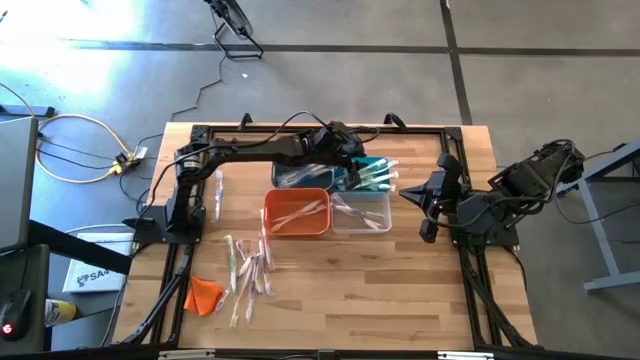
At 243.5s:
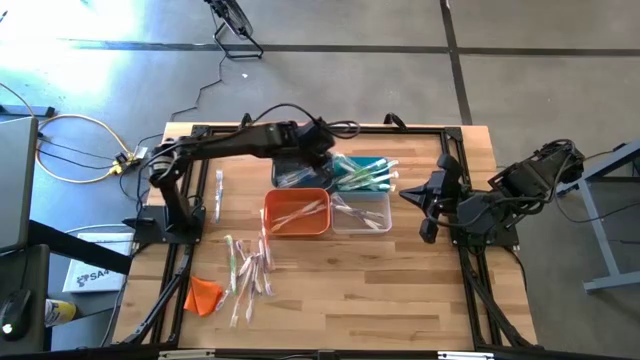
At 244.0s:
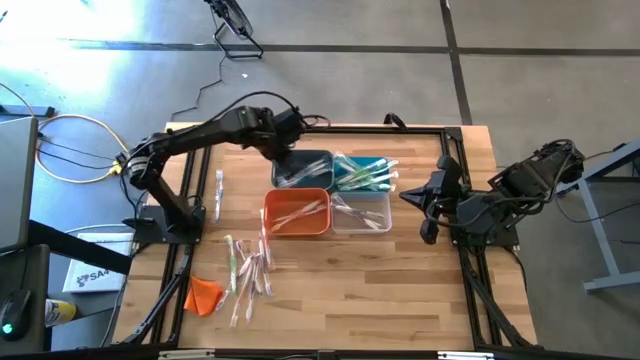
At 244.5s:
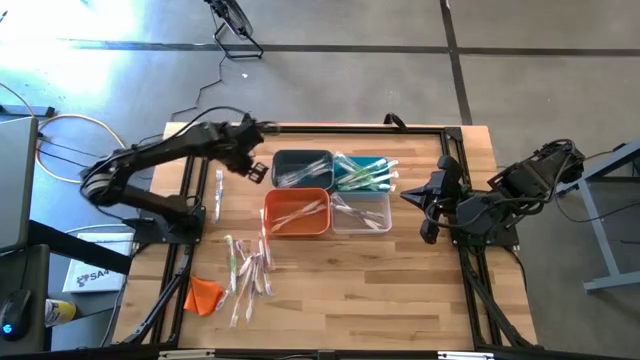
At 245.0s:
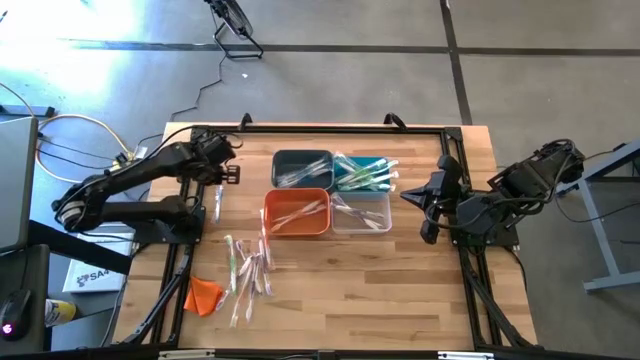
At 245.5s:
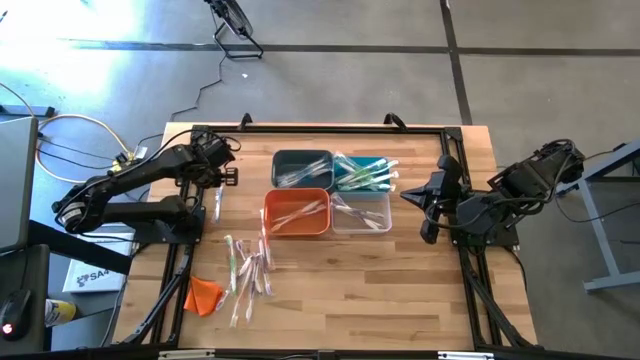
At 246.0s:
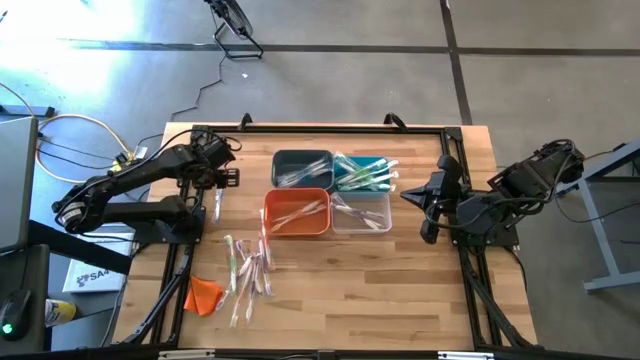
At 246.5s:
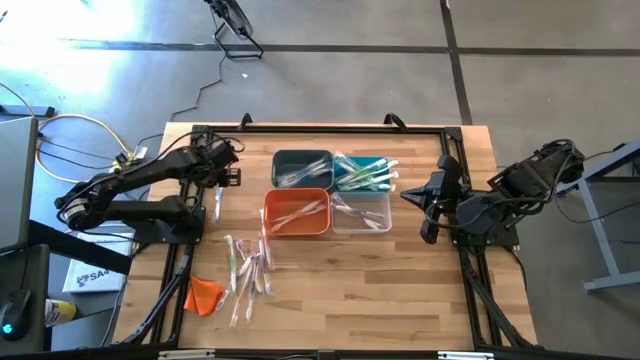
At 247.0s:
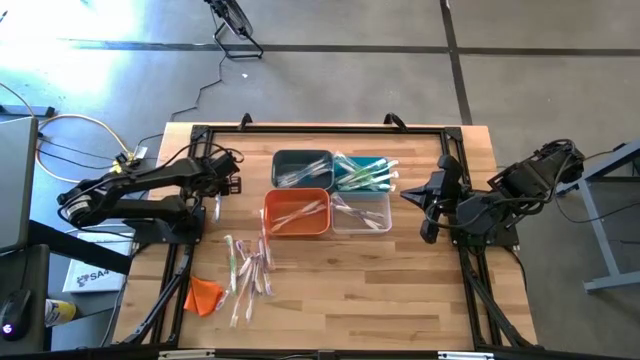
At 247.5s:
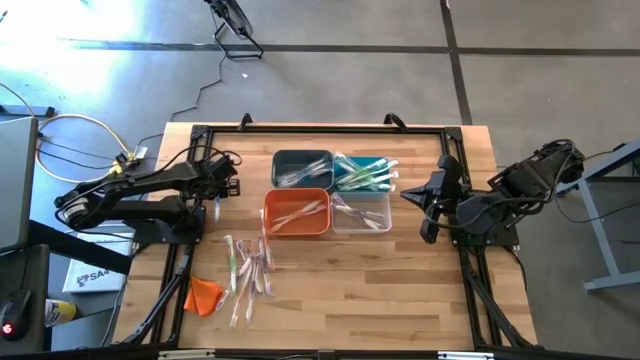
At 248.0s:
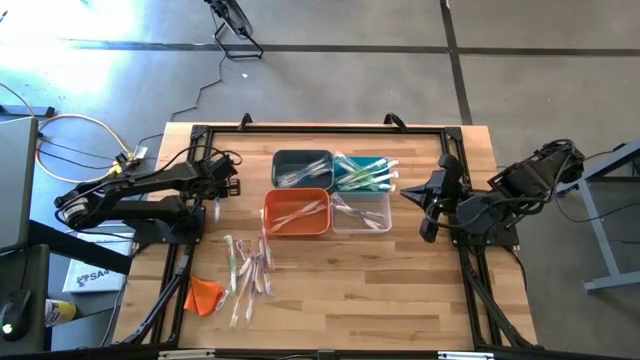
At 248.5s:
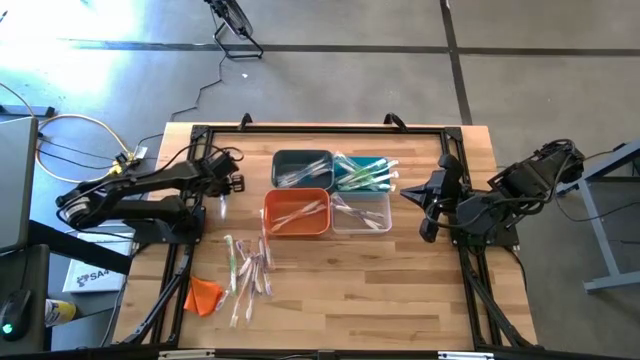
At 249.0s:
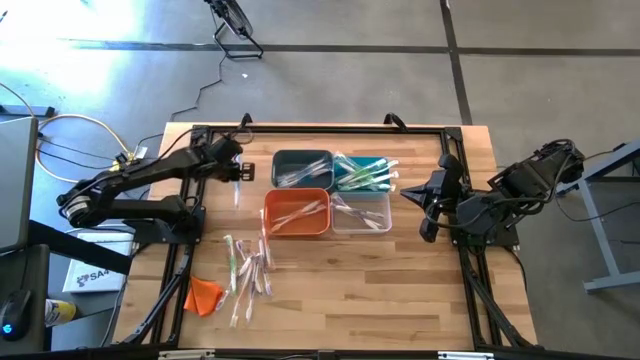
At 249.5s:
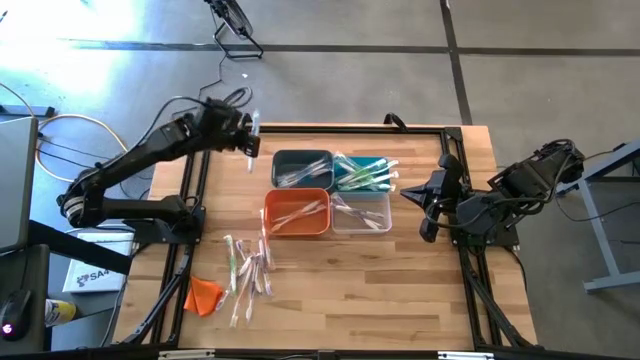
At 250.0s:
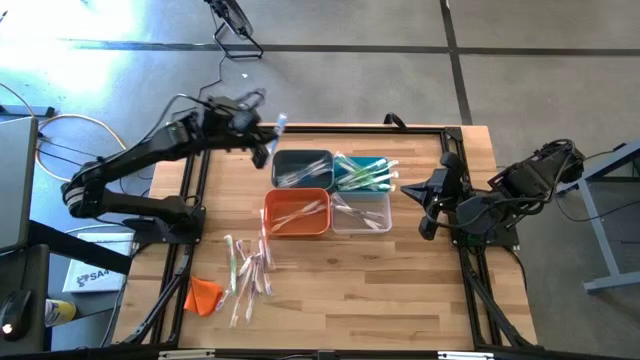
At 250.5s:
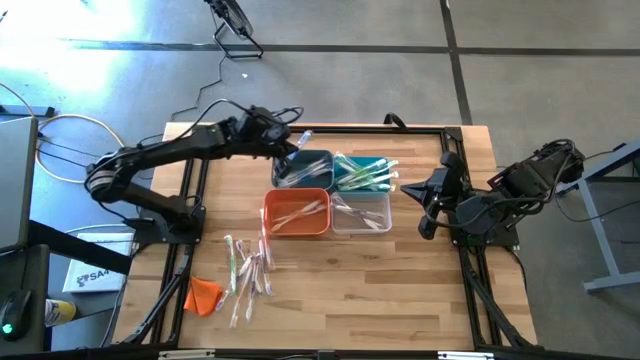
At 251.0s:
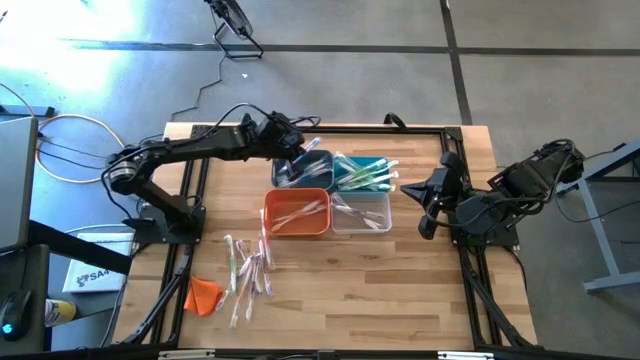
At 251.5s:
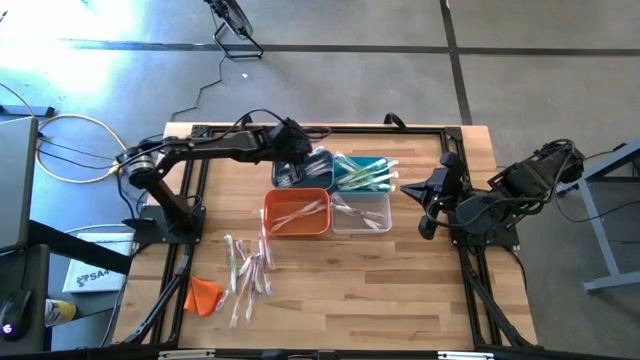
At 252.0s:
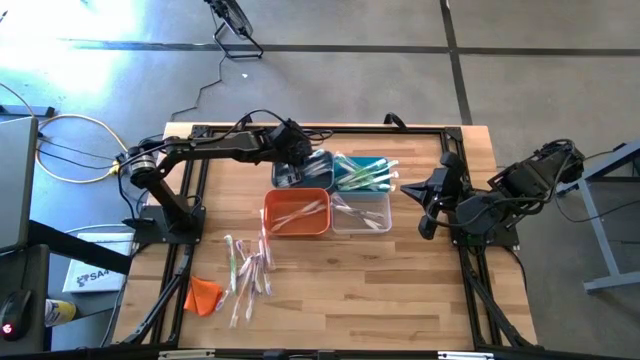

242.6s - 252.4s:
Task: Pick & Place Toothbrushes
Put the blue toothbrush into the left blue bin

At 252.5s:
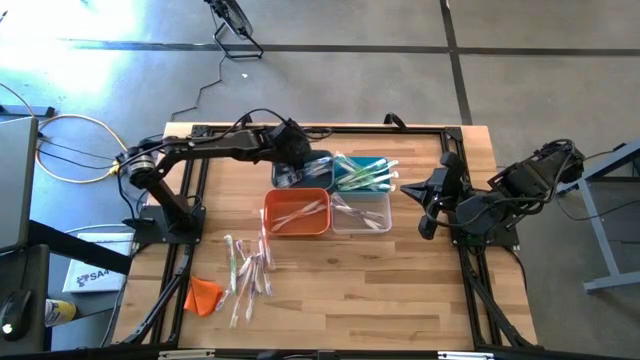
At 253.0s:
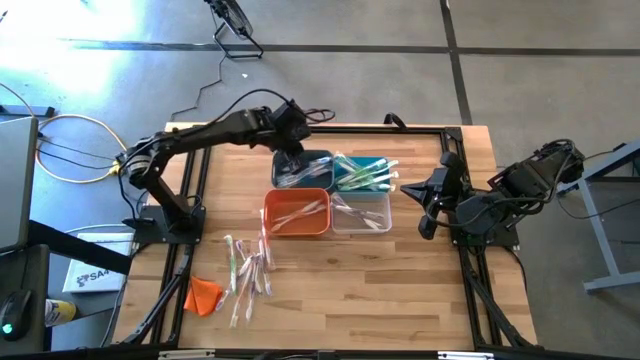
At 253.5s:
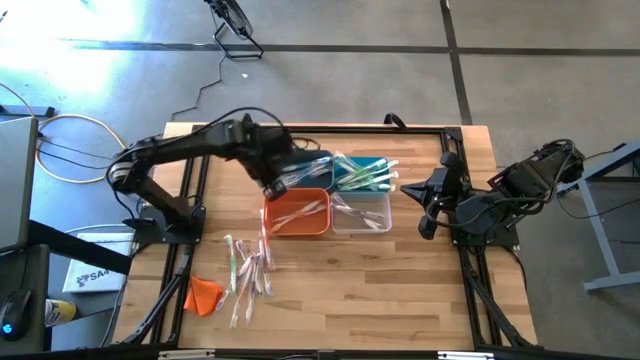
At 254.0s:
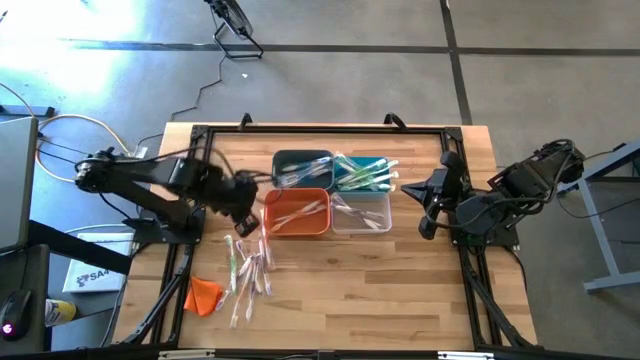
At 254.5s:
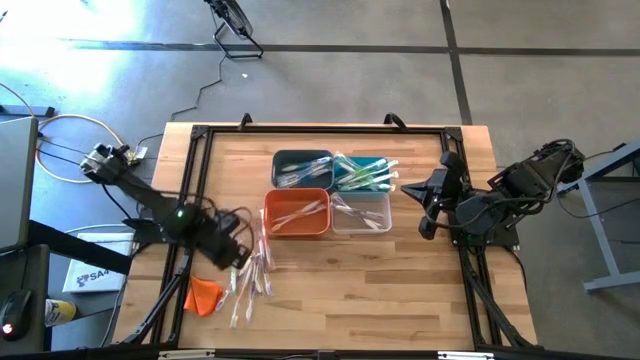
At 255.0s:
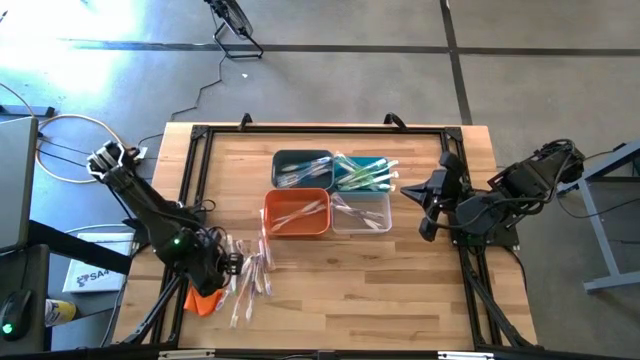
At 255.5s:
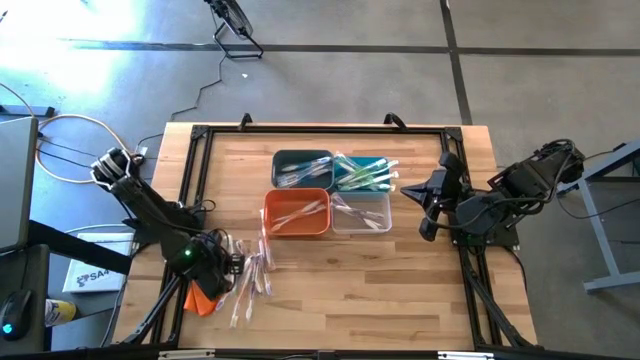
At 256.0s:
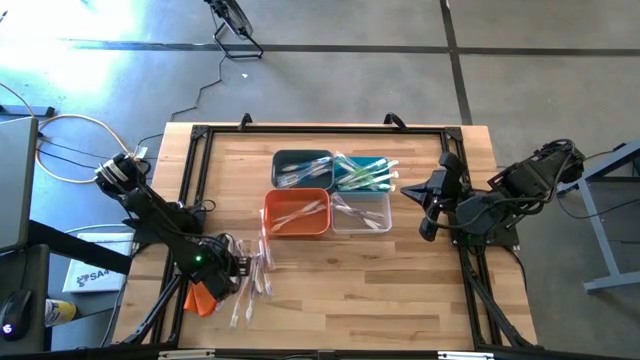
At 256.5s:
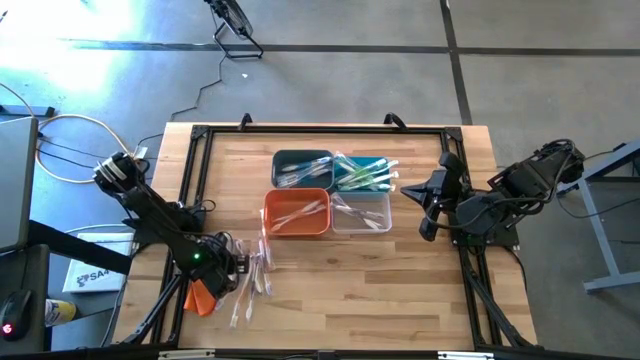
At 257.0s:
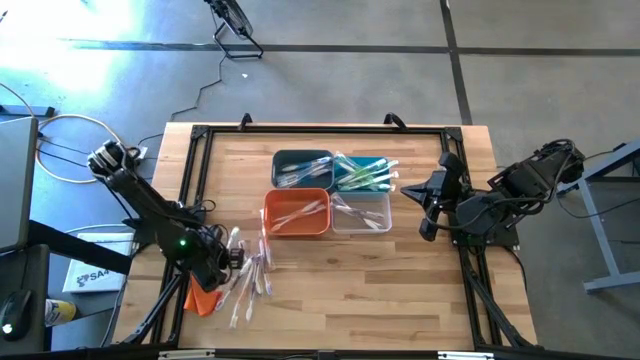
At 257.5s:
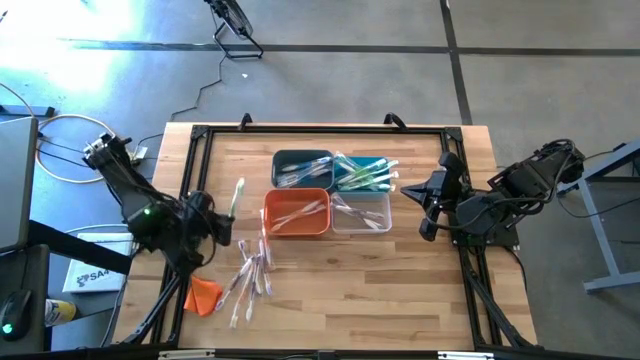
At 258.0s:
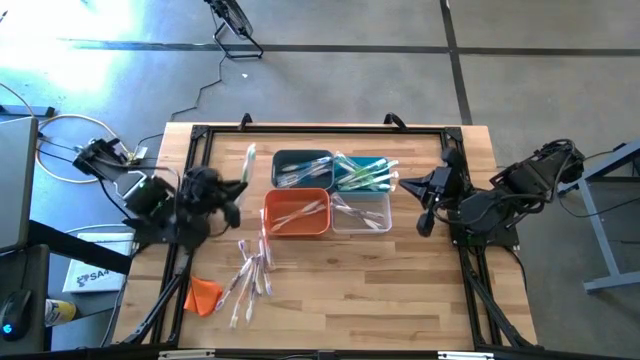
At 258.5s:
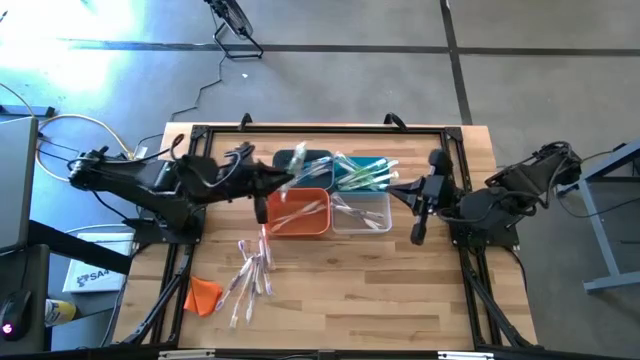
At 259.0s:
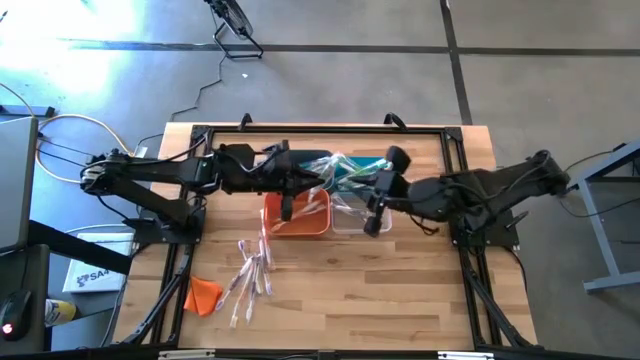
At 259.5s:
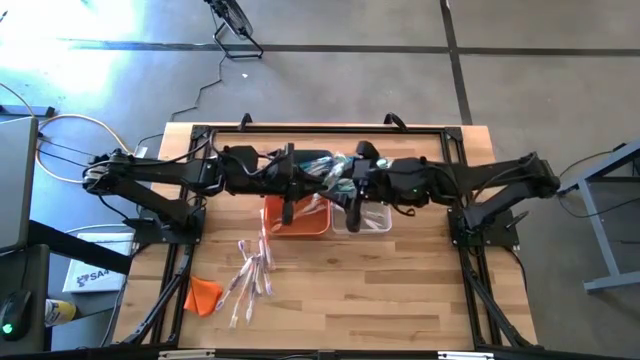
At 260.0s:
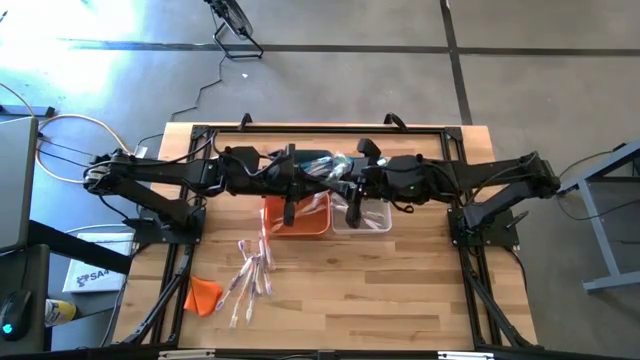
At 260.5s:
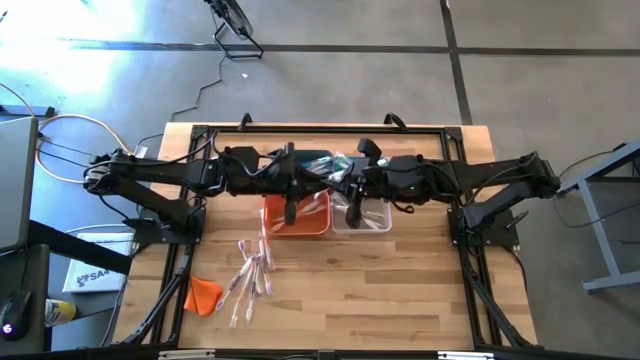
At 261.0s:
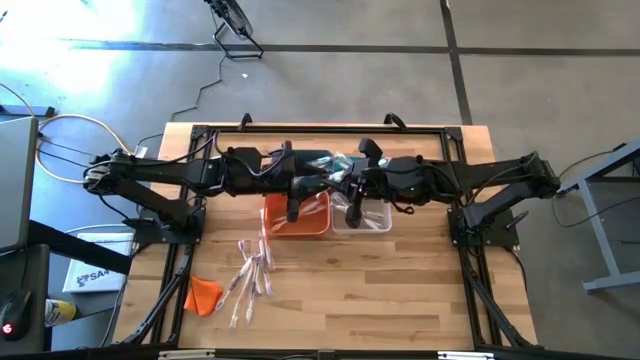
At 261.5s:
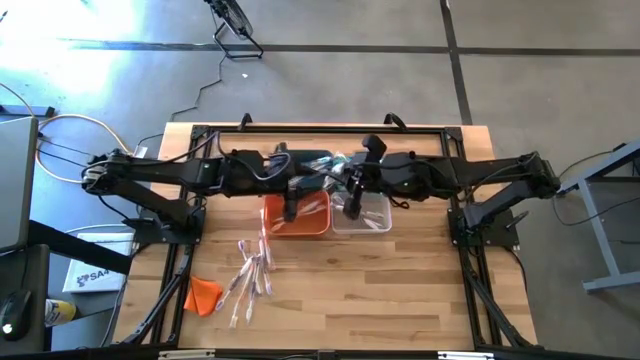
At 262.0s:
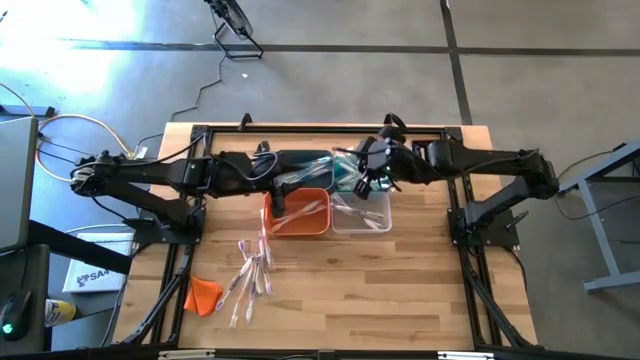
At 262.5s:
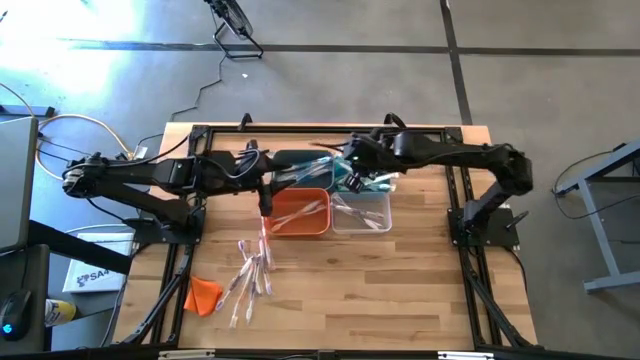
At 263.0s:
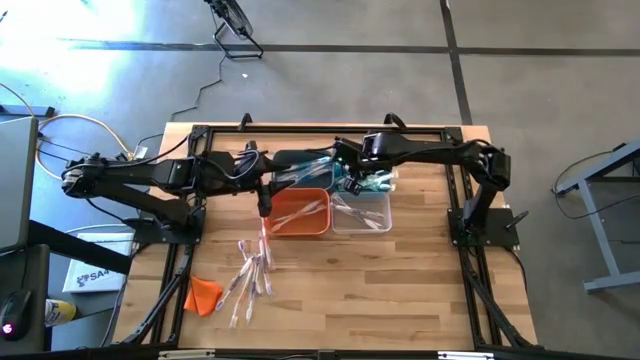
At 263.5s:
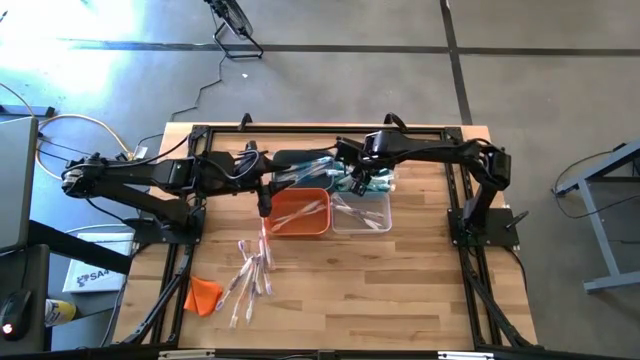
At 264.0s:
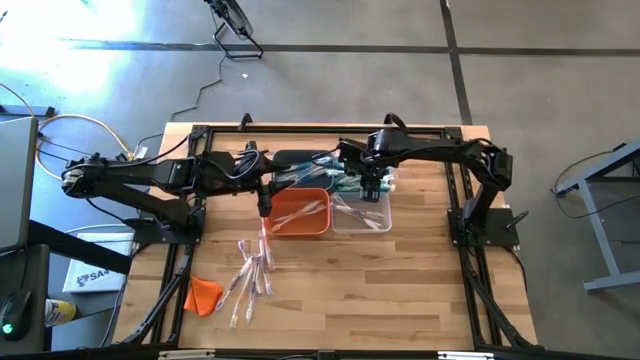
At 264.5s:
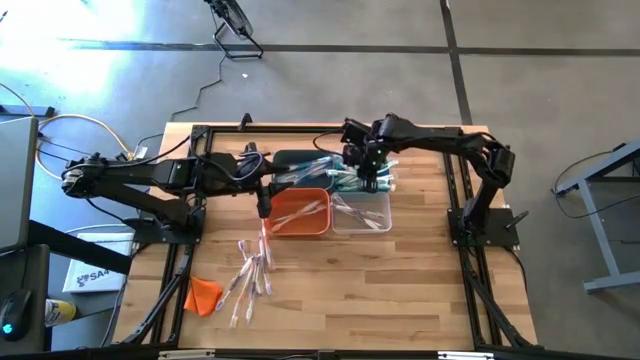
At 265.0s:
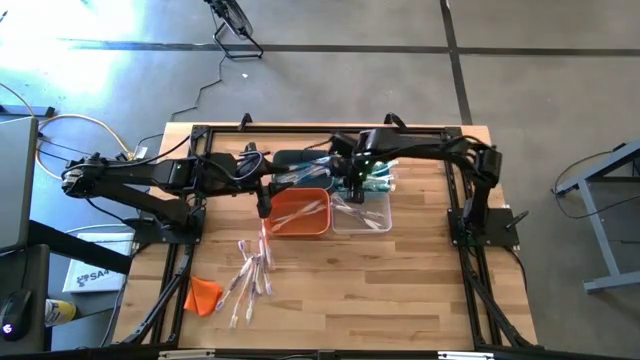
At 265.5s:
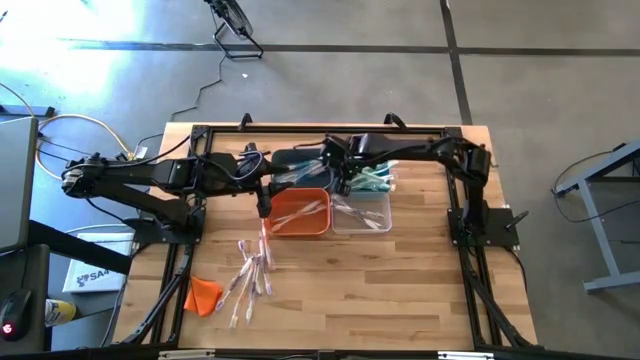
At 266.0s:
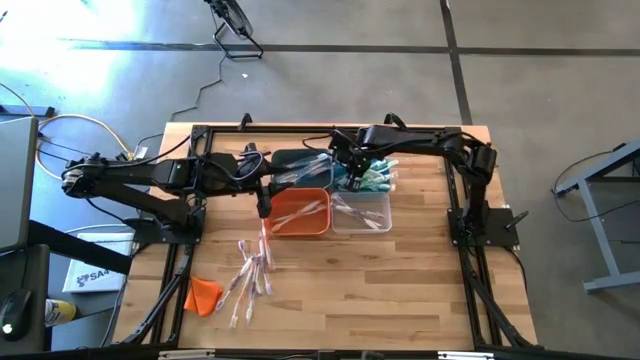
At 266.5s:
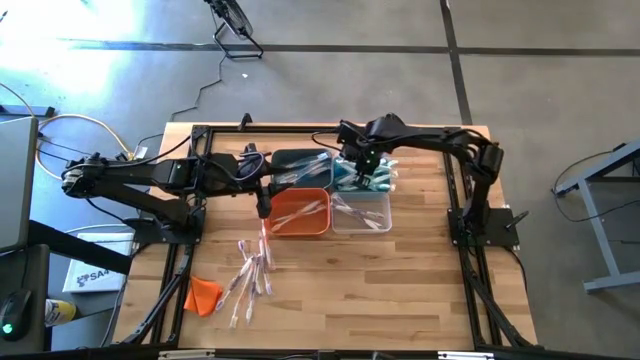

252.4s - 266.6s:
Put the green toothbrush into the right blue bin
